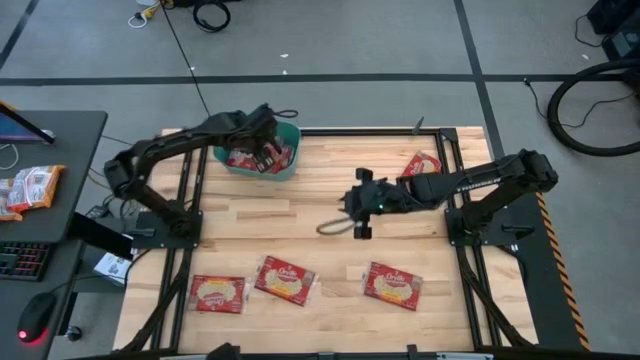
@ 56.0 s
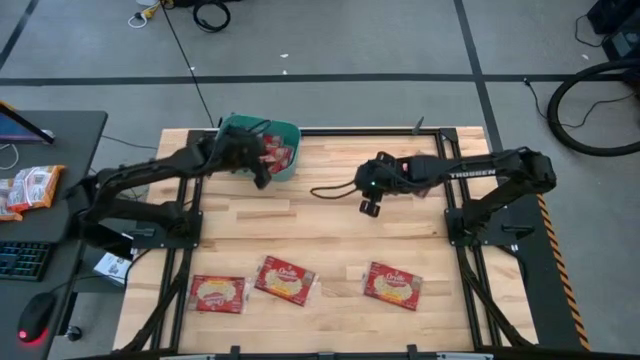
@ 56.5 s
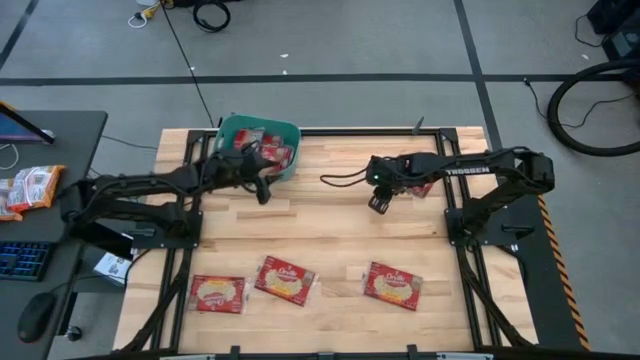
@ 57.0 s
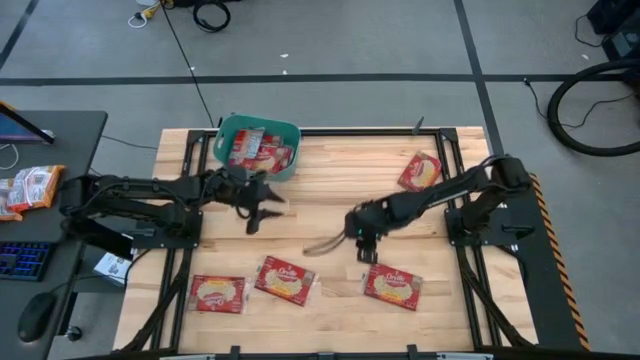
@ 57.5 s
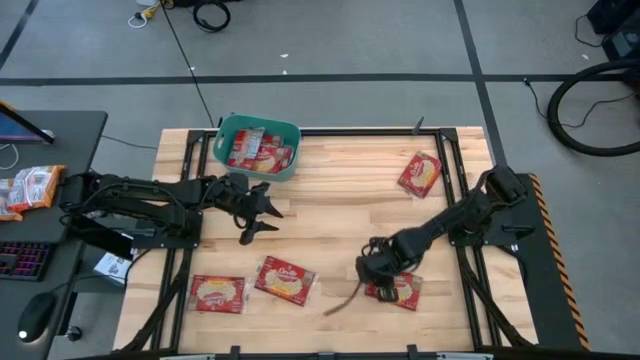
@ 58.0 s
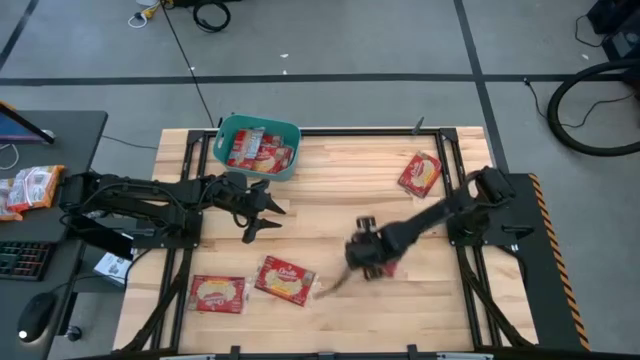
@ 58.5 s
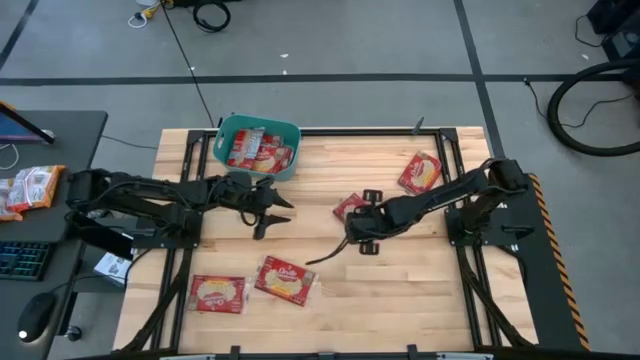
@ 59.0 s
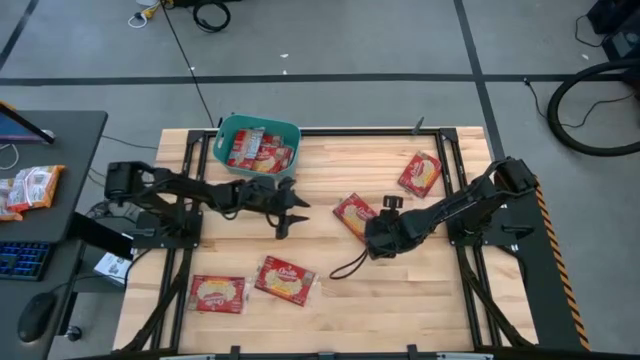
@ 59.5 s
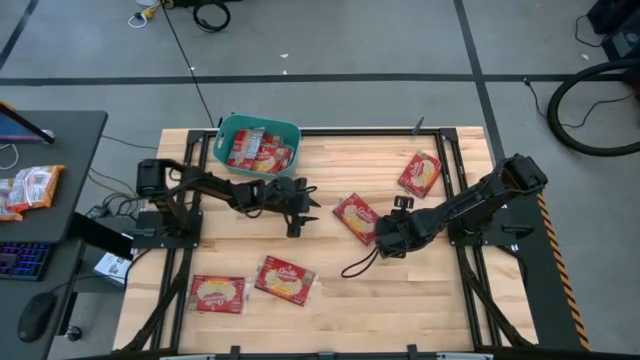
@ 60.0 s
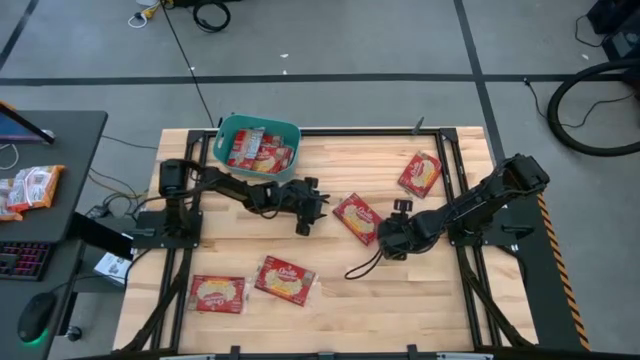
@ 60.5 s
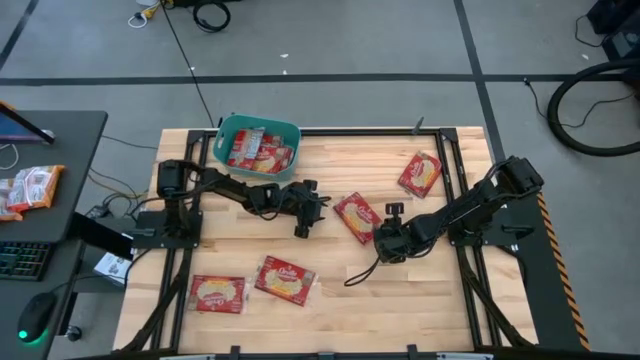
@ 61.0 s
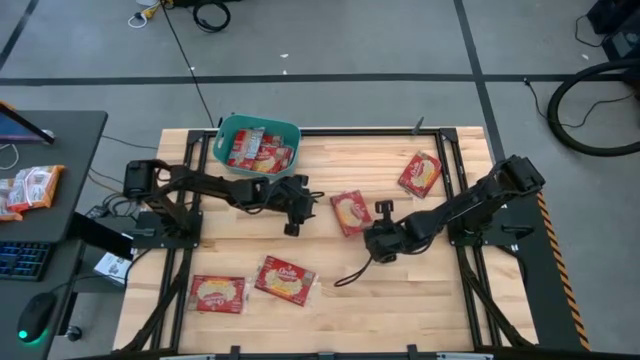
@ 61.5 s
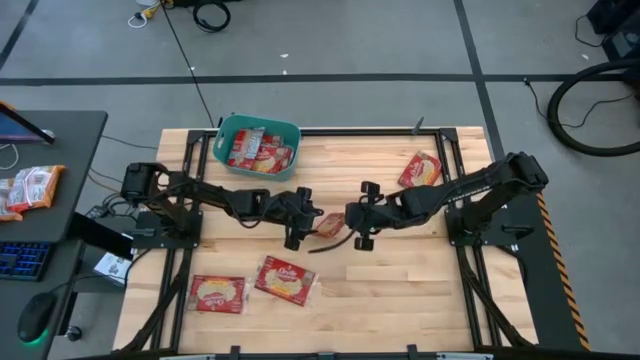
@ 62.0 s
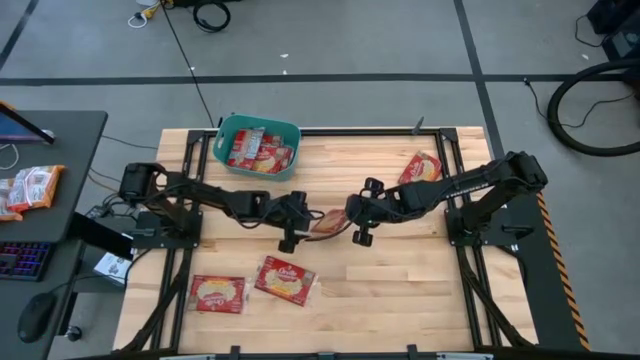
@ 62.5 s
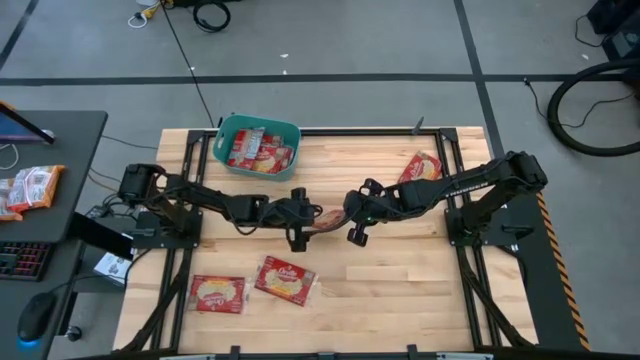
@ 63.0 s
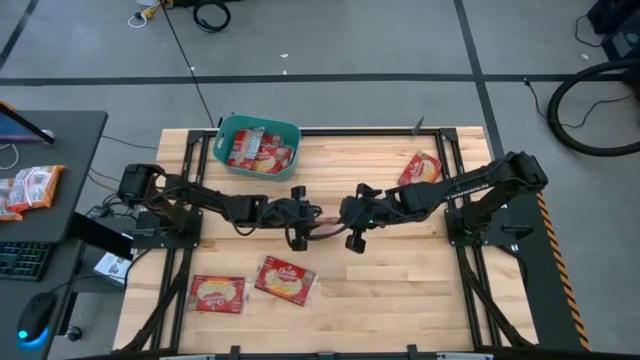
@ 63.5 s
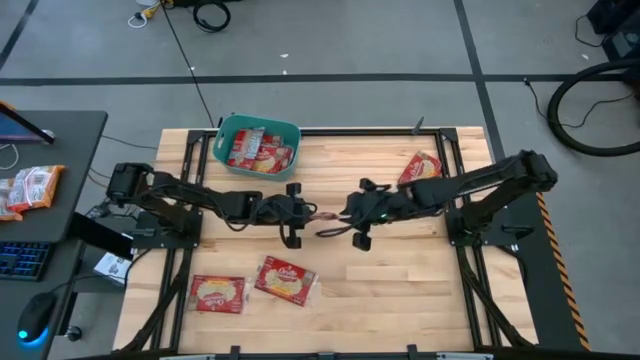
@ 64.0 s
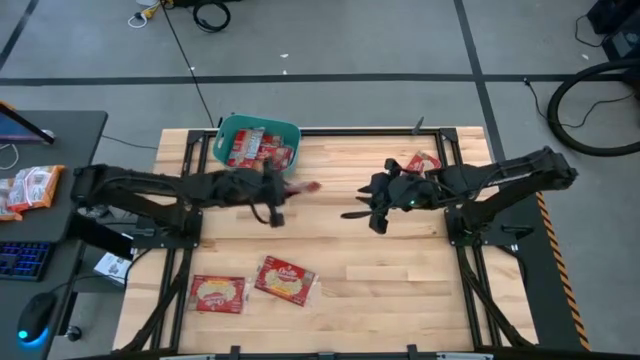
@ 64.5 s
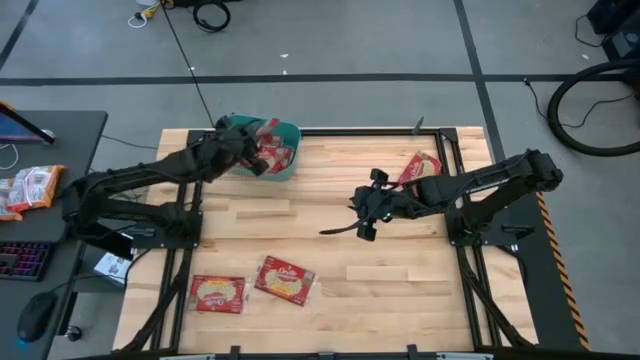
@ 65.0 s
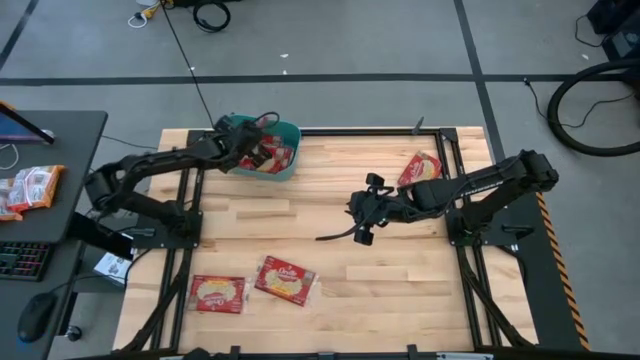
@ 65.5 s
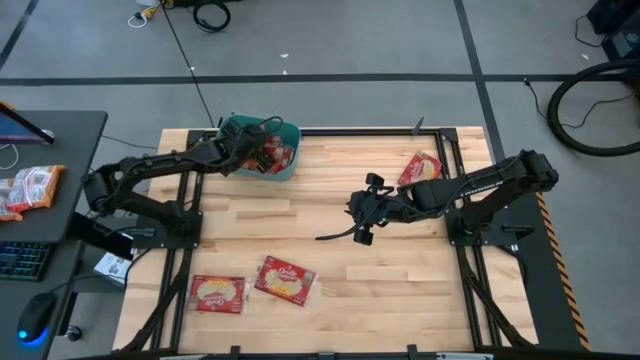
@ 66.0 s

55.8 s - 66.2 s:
Task: Sort popcorn bags into baskets
Put the popcorn bag into the bin

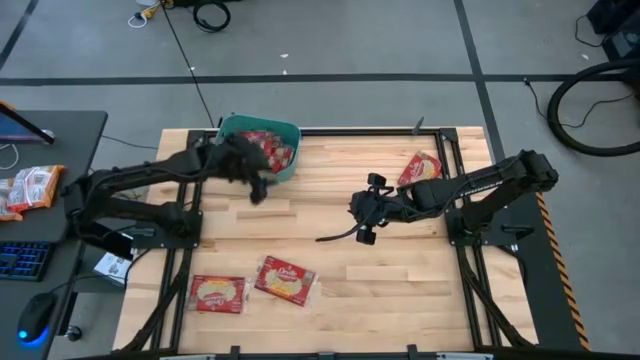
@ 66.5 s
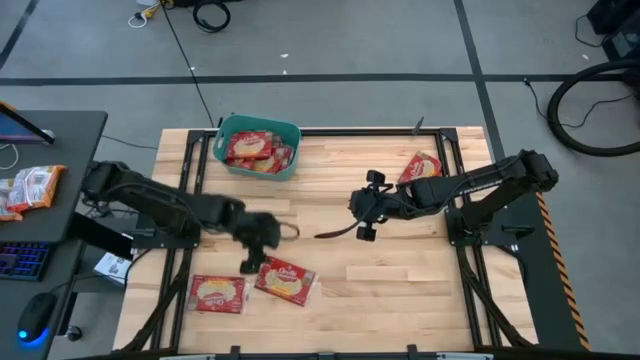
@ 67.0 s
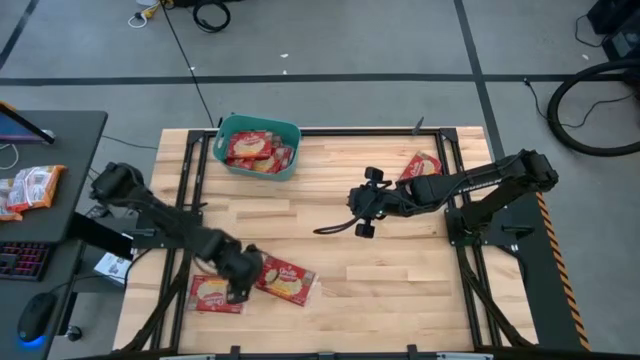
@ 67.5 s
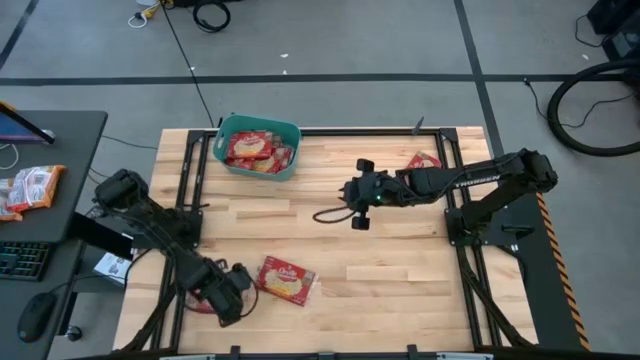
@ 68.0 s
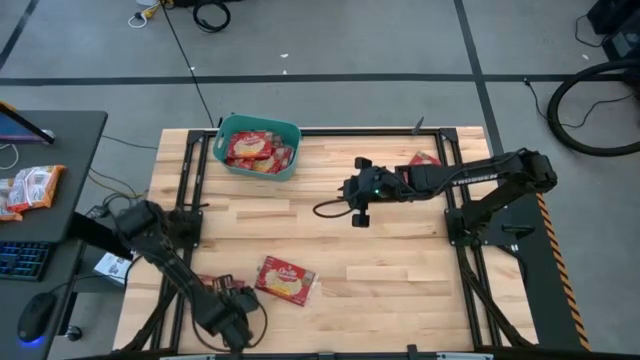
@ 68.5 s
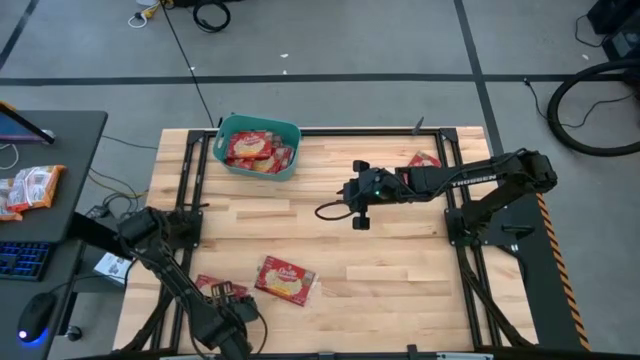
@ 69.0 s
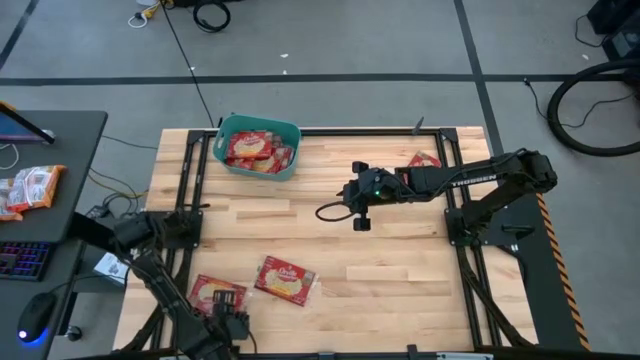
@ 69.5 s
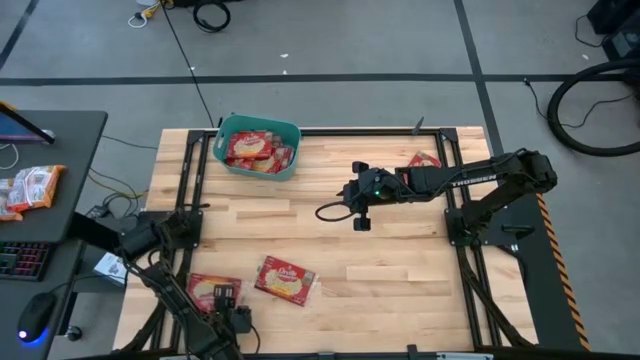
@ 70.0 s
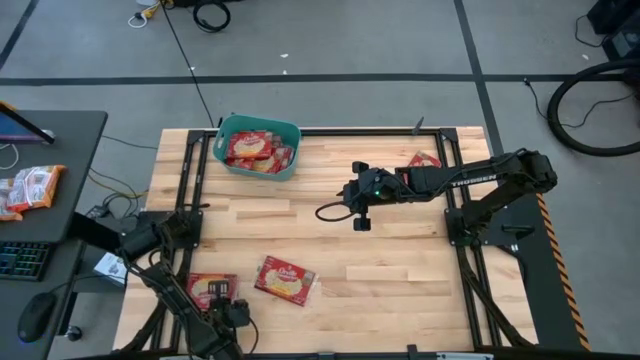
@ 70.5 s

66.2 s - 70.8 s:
Put the popcorn bag into the bin

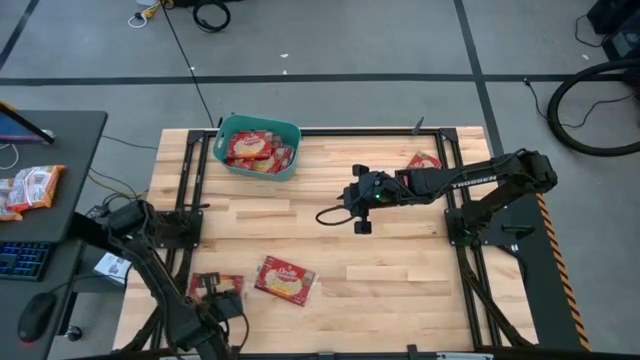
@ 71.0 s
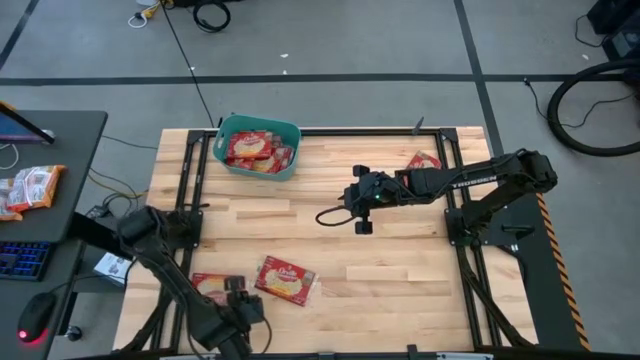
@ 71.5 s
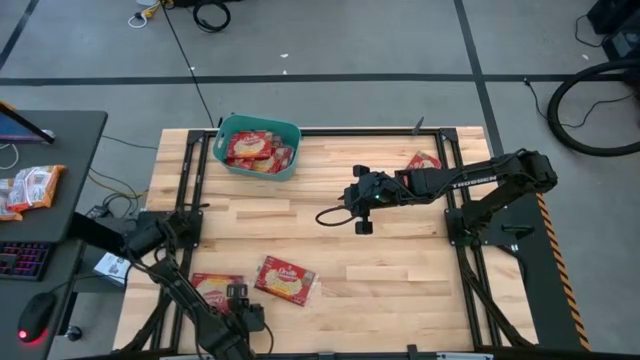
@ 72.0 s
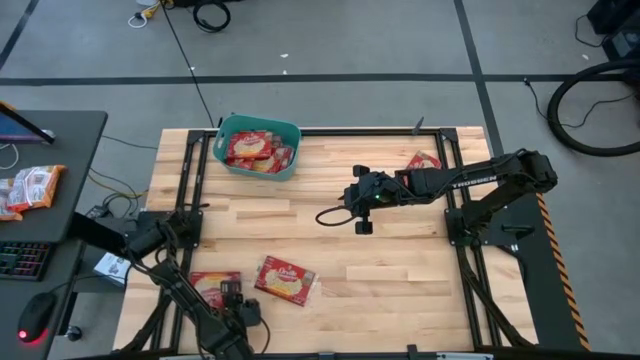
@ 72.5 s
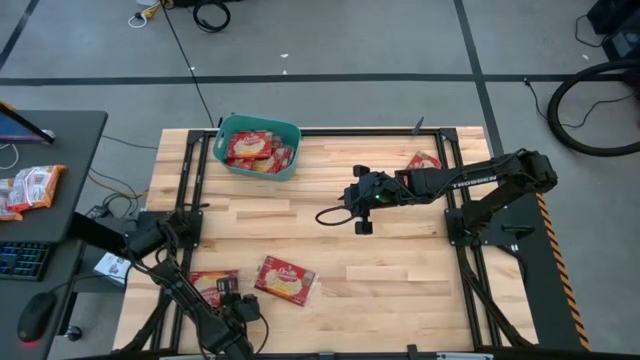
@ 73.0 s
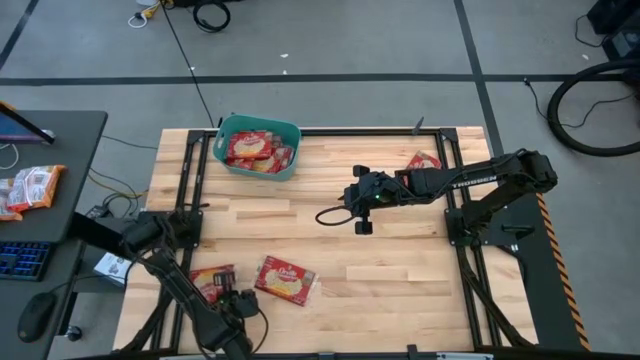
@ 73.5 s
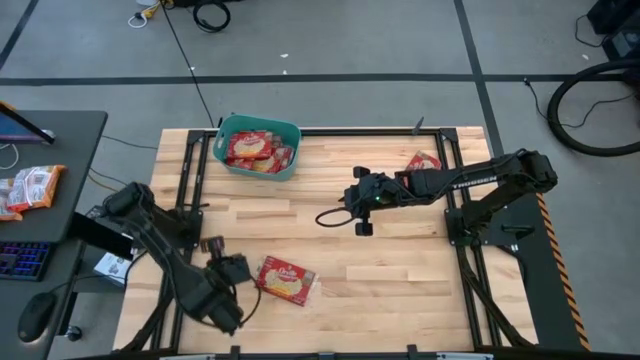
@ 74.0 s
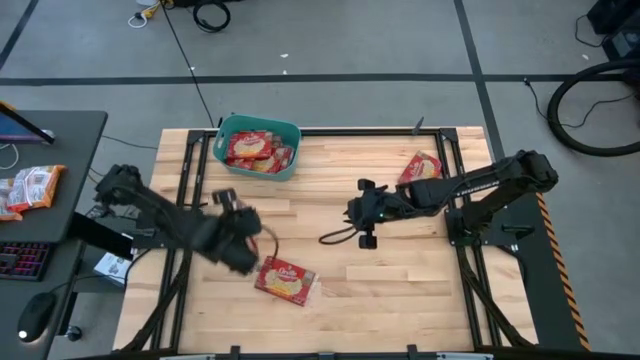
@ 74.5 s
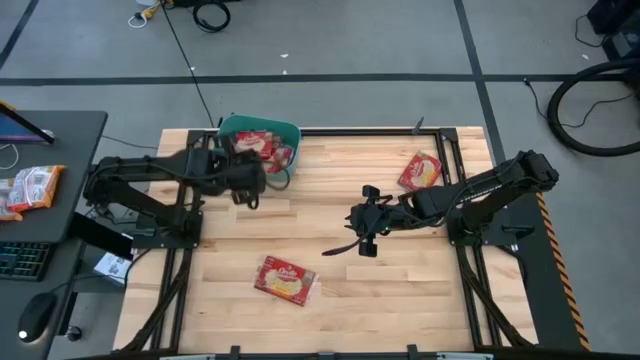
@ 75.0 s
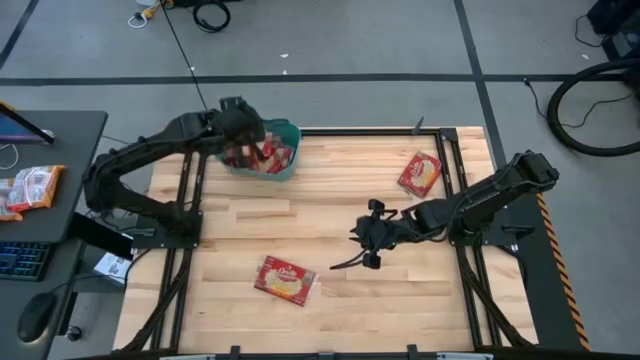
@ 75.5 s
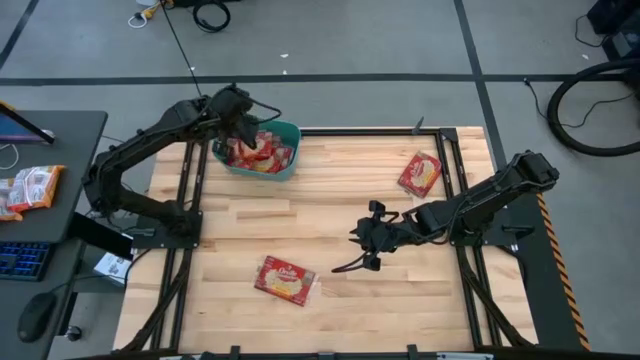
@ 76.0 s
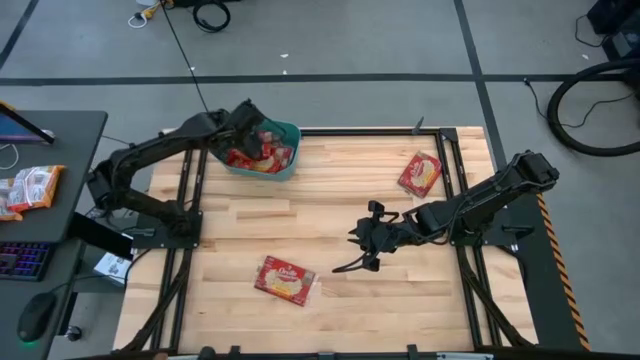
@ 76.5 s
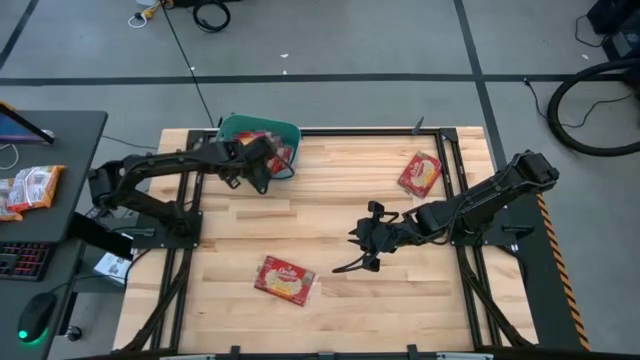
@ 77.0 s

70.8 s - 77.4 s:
Put the bottom left popcorn bag into the bin
